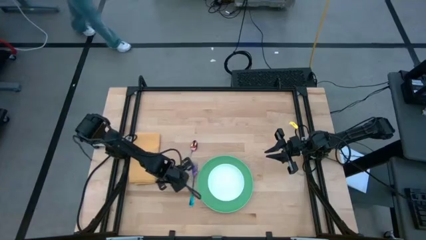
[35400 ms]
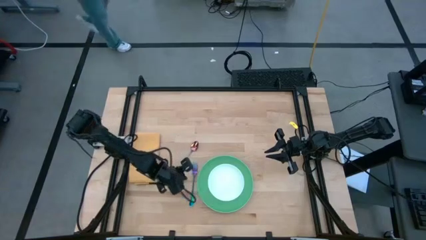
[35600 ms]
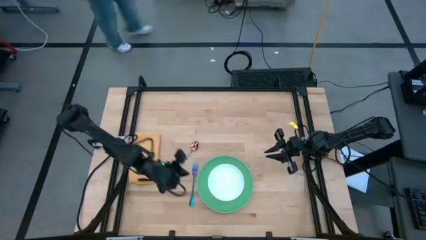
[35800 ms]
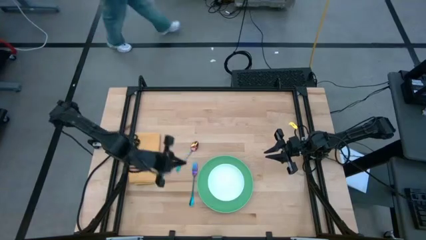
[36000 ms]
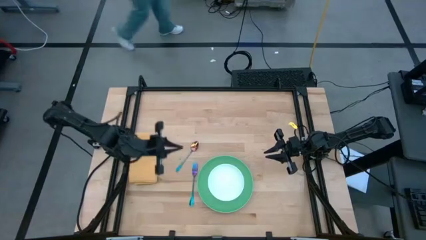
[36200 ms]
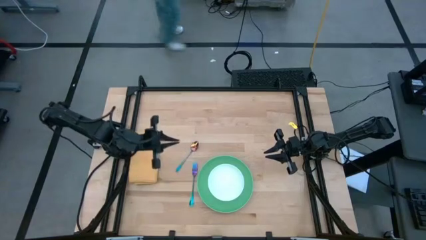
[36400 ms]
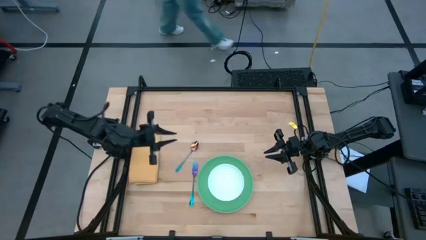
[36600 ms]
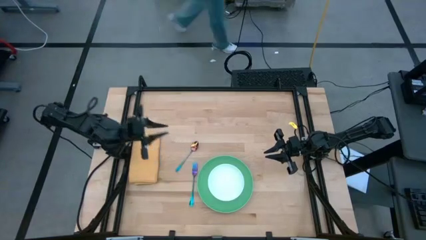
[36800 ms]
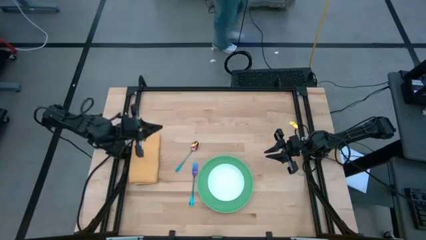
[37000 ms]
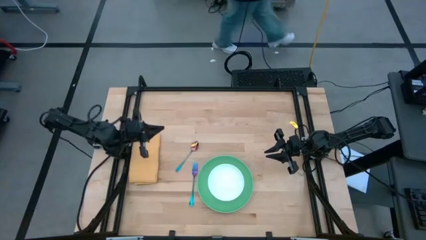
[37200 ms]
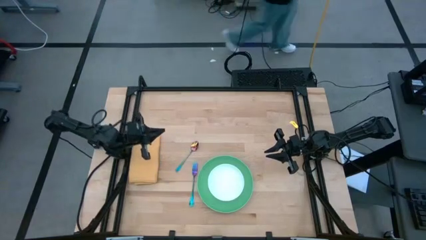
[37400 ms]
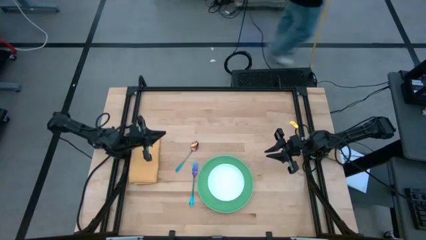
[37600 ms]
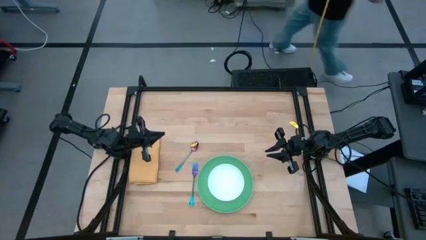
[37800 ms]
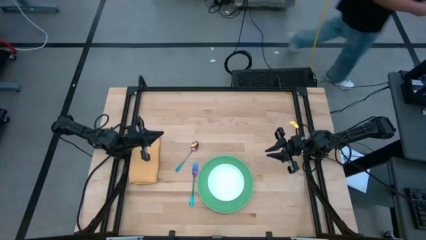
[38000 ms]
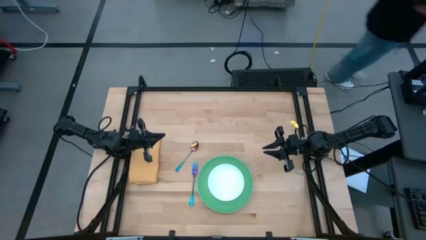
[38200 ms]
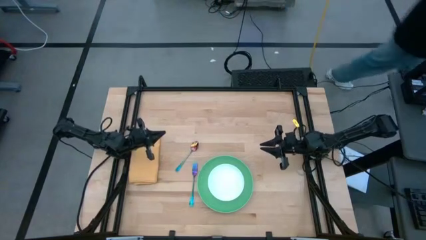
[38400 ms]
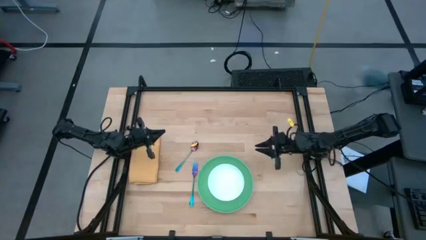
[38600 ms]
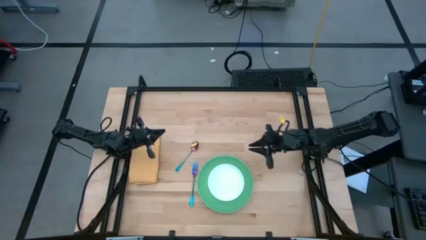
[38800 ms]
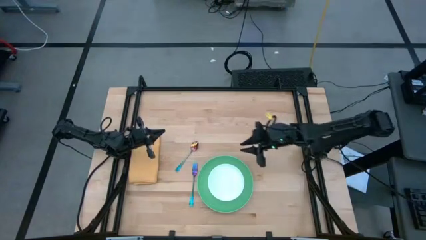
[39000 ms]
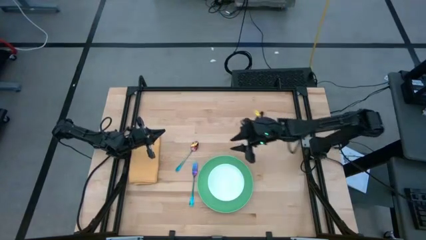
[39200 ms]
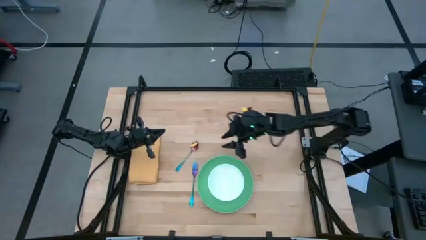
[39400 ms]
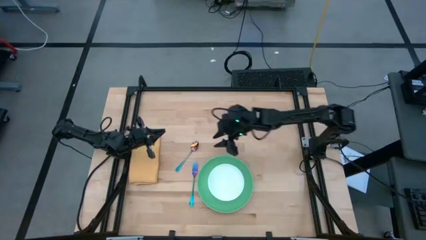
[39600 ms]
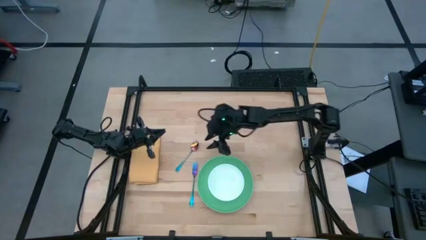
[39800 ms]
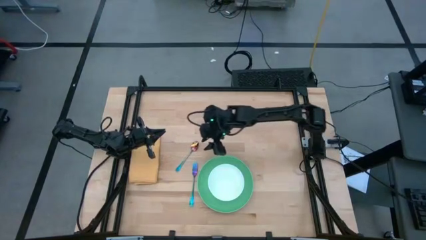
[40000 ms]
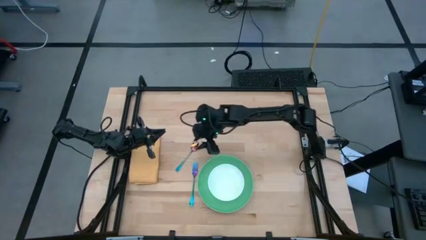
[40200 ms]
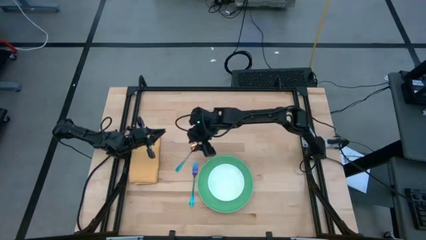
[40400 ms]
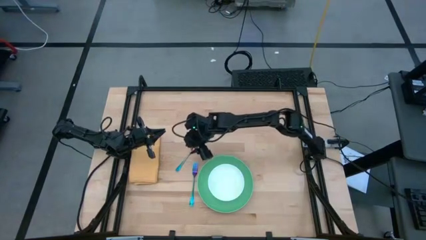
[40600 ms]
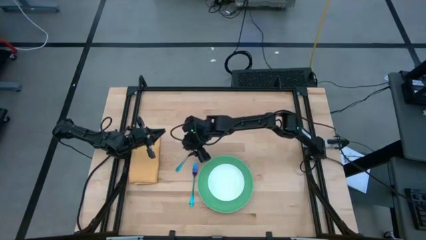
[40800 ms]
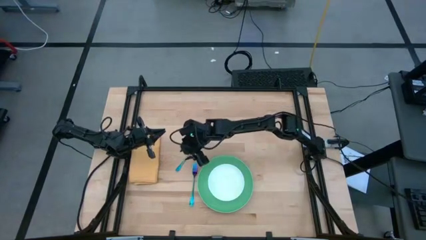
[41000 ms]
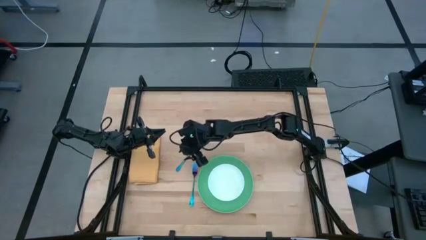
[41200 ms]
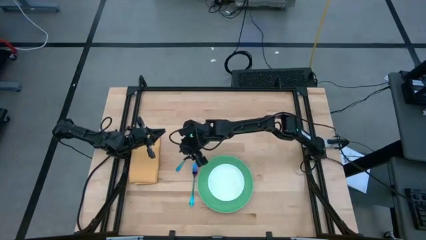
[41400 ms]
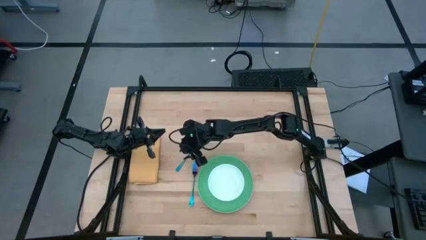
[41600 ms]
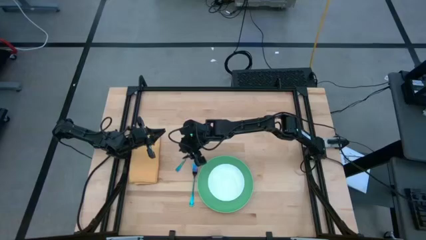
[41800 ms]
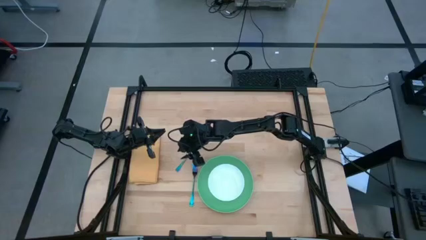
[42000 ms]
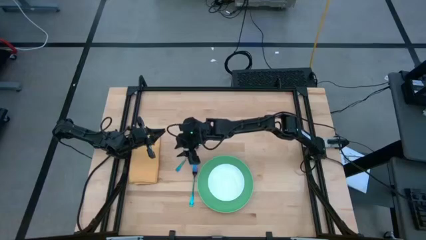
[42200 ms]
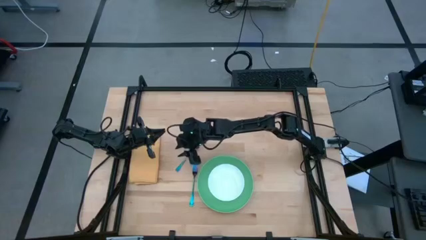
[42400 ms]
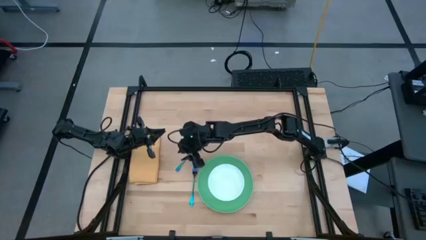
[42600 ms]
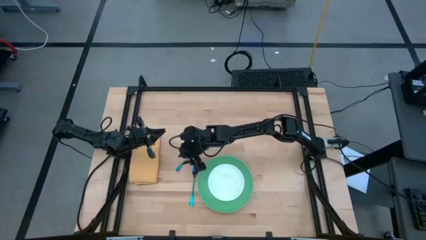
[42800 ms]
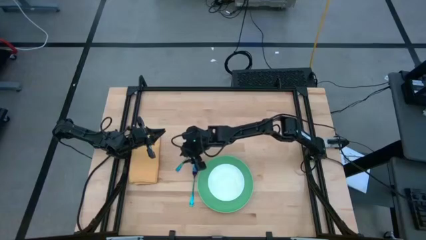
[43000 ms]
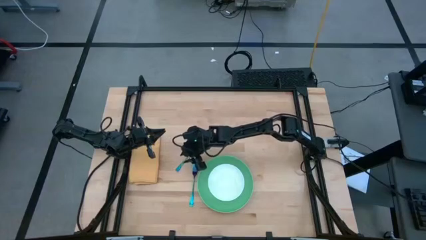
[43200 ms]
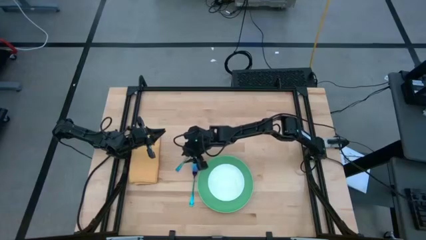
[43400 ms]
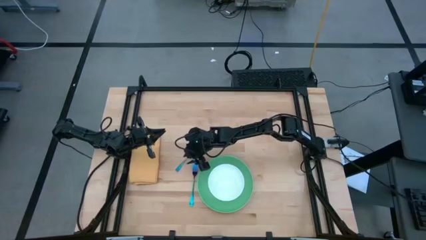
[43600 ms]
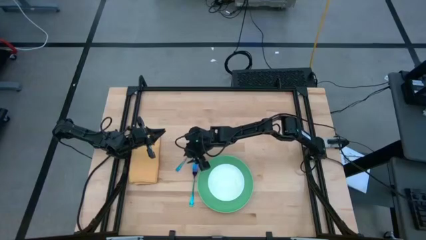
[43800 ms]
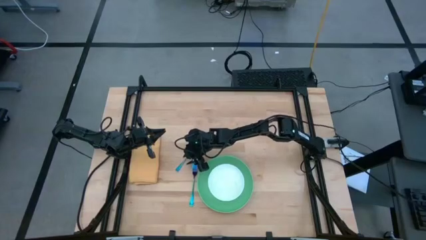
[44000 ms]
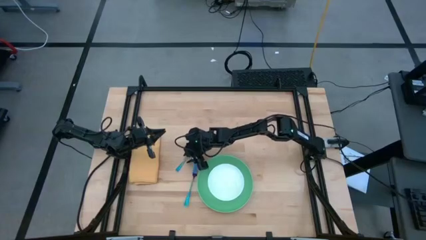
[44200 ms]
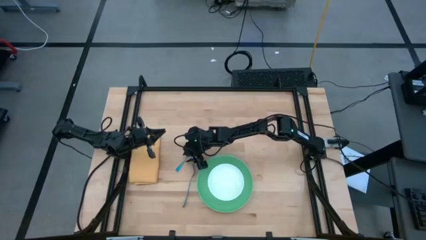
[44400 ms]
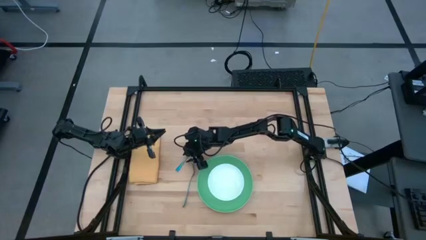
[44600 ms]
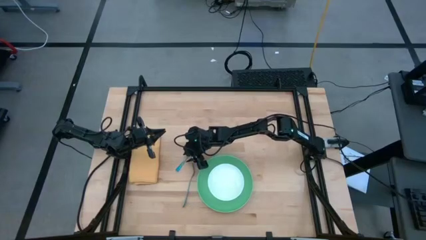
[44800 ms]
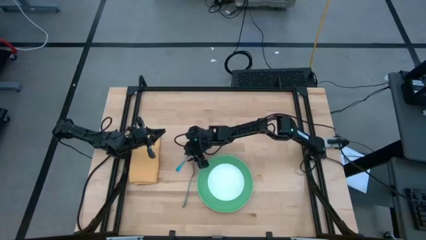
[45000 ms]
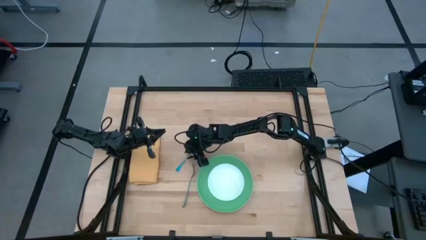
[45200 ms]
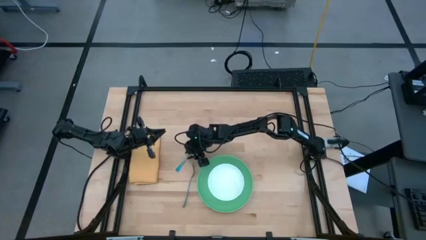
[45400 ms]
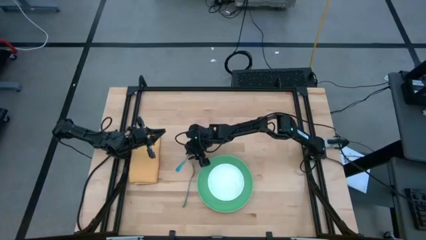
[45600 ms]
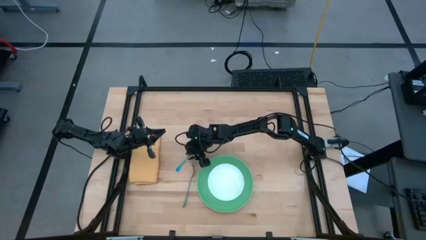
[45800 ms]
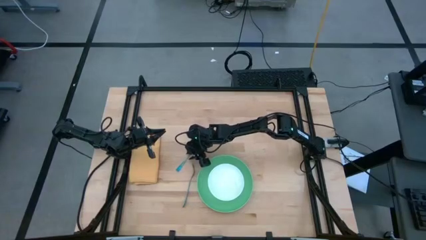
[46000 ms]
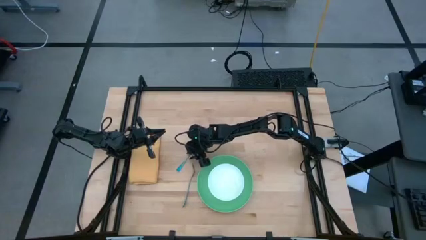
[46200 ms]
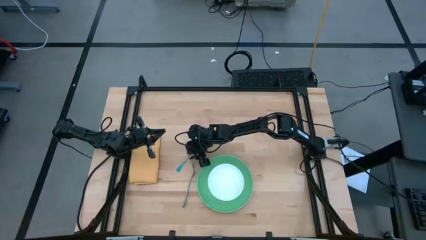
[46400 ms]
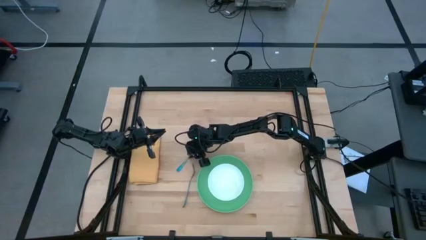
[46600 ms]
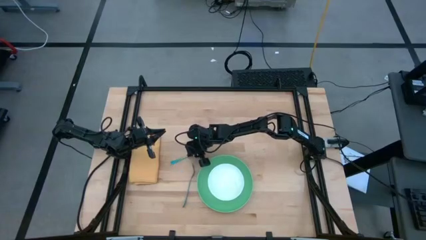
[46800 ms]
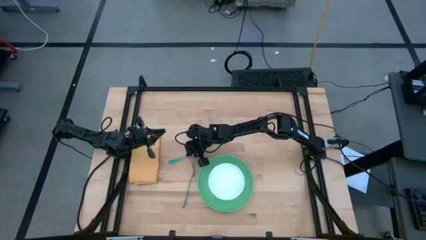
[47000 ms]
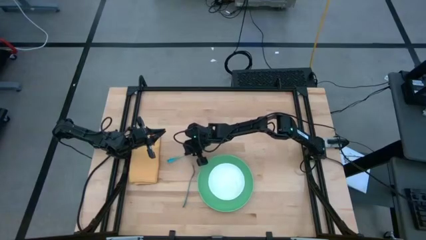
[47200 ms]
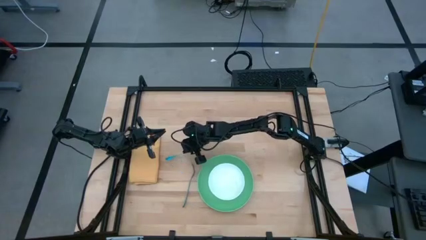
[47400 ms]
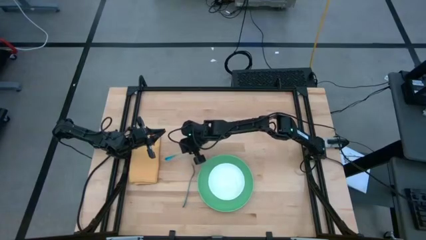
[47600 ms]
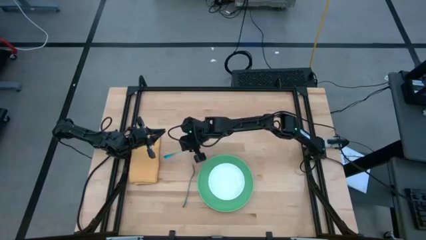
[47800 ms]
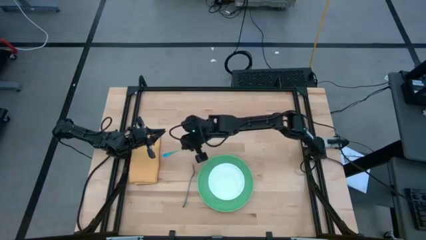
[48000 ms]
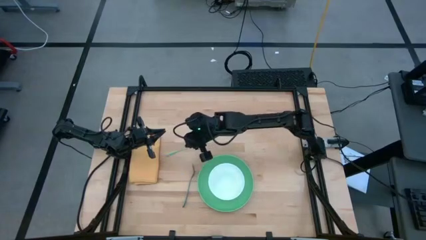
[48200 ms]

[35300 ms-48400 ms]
Task: Set table place
Put the blue spoon into the white bowl
